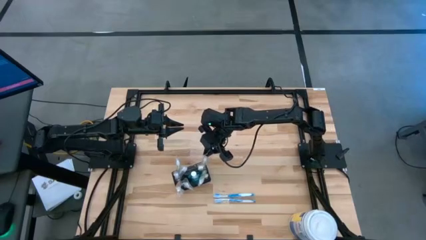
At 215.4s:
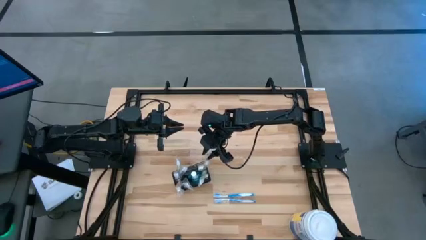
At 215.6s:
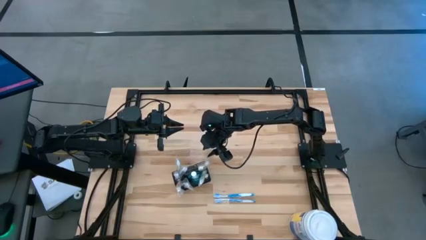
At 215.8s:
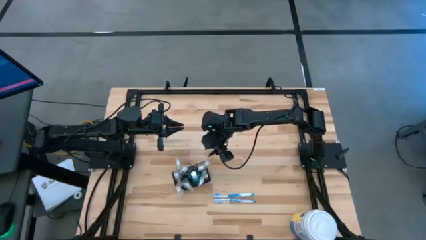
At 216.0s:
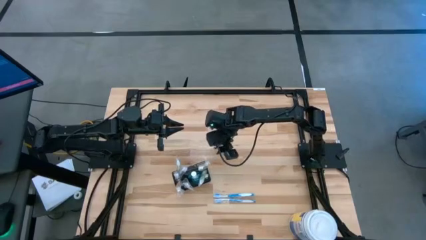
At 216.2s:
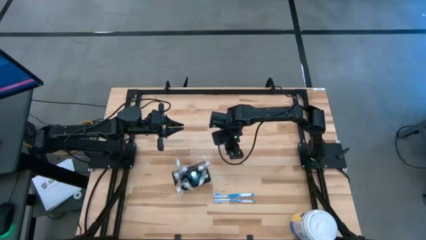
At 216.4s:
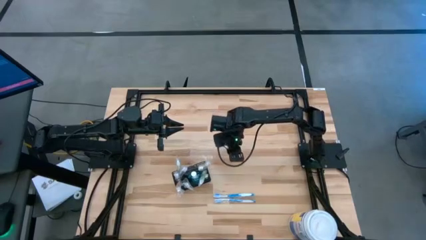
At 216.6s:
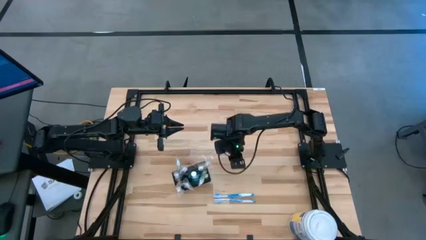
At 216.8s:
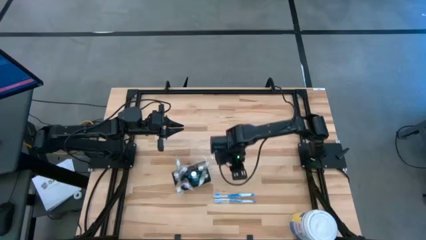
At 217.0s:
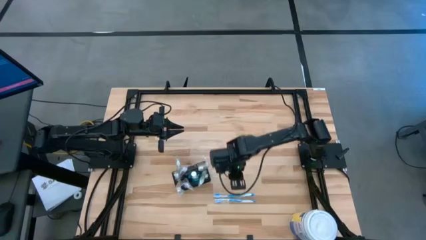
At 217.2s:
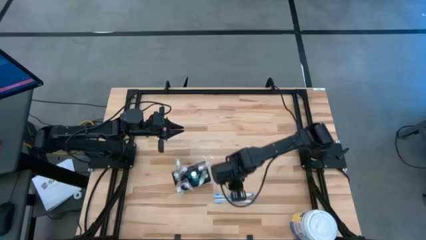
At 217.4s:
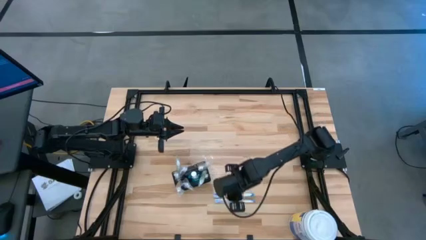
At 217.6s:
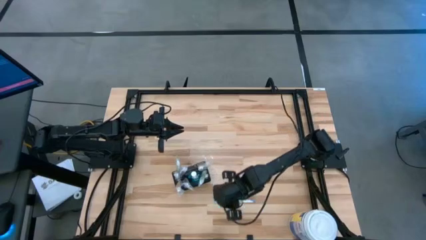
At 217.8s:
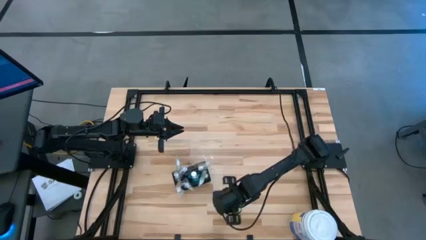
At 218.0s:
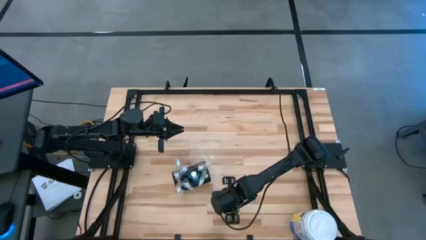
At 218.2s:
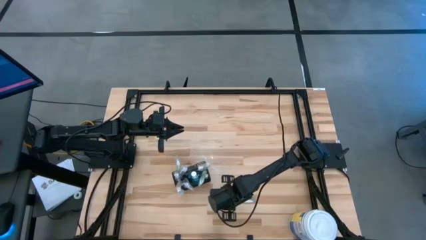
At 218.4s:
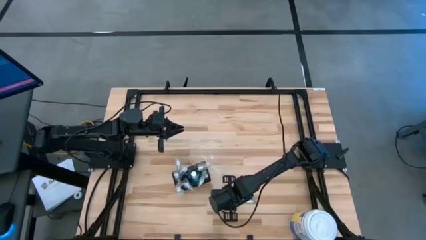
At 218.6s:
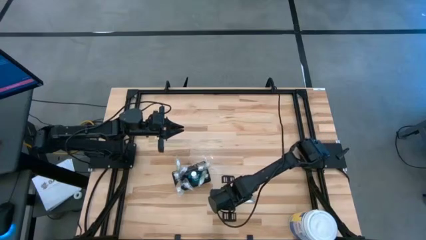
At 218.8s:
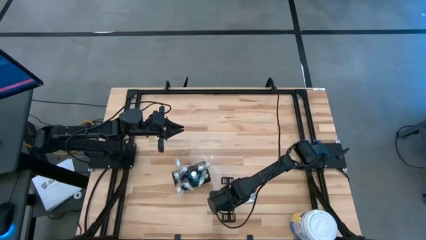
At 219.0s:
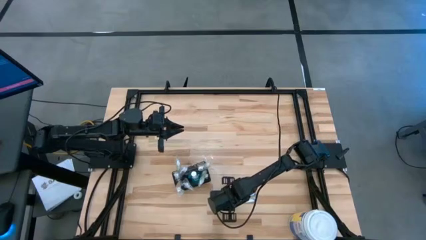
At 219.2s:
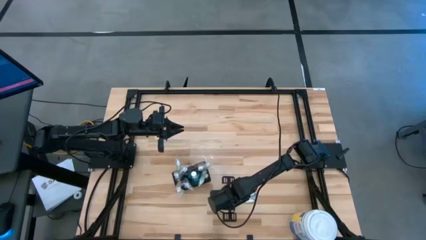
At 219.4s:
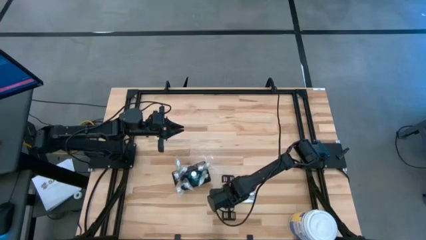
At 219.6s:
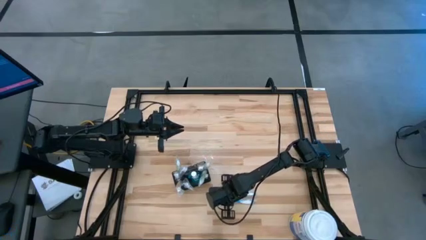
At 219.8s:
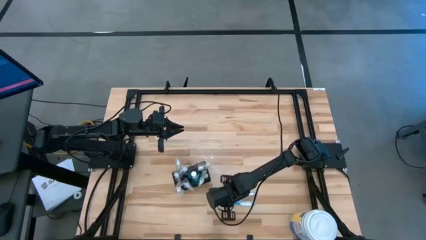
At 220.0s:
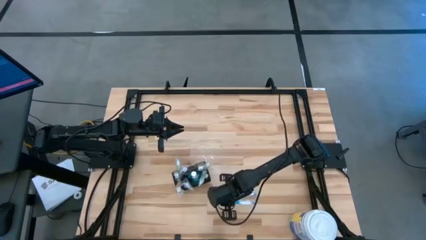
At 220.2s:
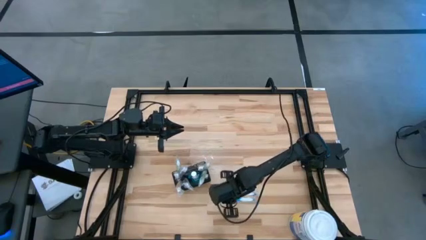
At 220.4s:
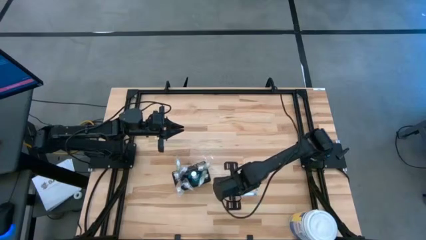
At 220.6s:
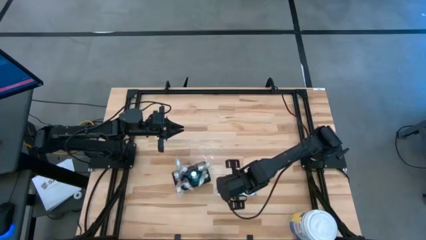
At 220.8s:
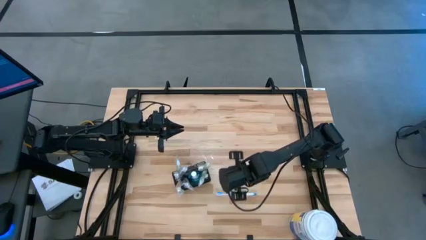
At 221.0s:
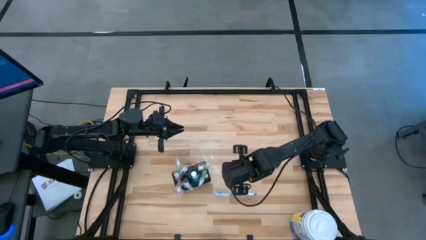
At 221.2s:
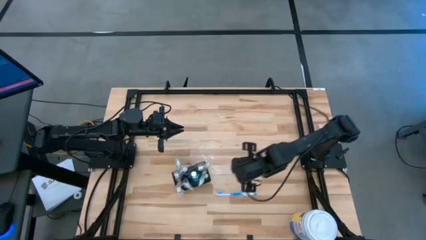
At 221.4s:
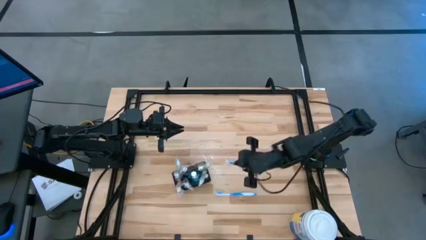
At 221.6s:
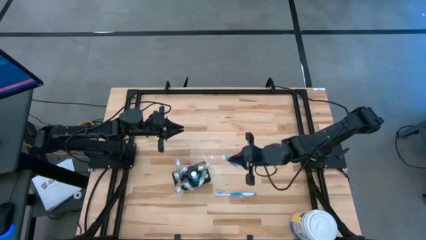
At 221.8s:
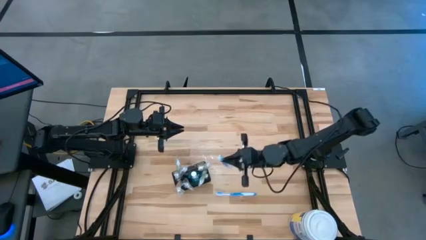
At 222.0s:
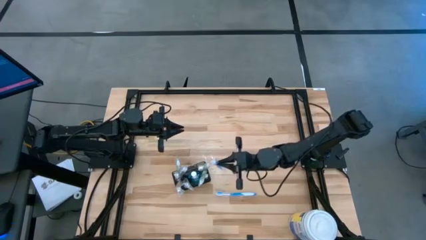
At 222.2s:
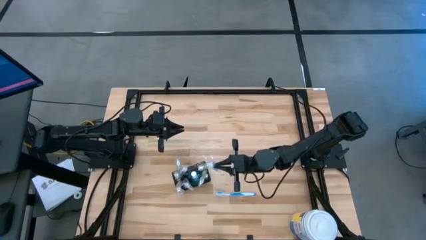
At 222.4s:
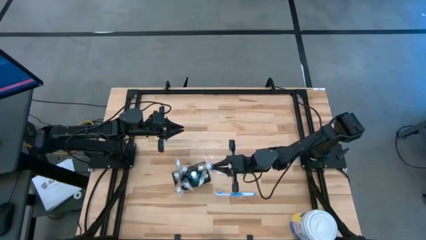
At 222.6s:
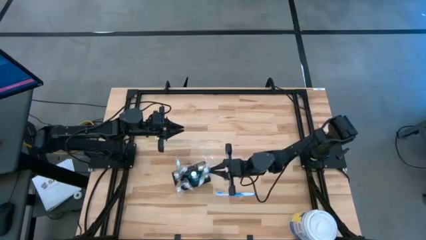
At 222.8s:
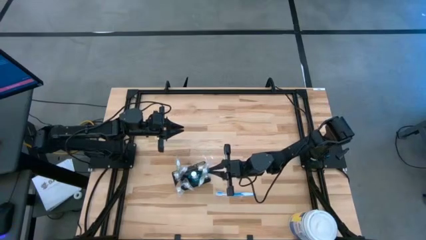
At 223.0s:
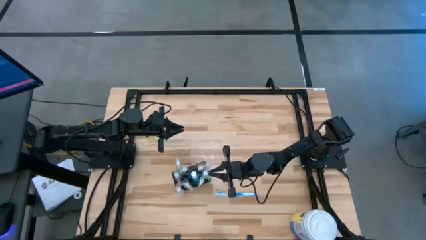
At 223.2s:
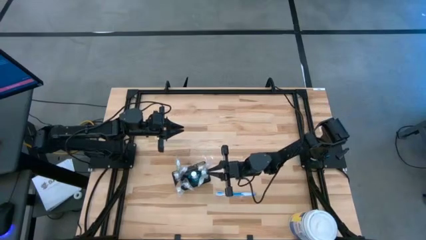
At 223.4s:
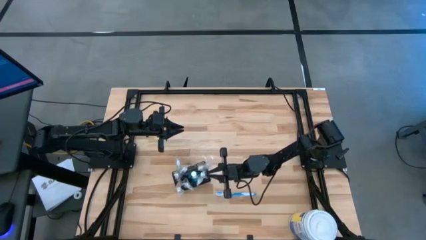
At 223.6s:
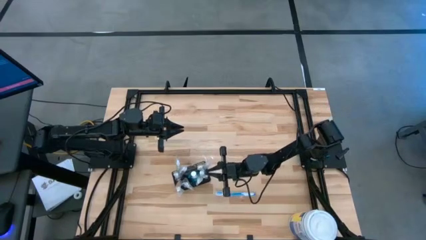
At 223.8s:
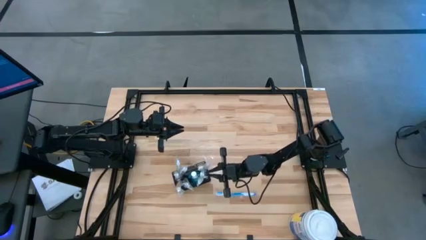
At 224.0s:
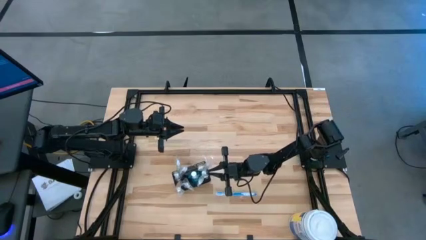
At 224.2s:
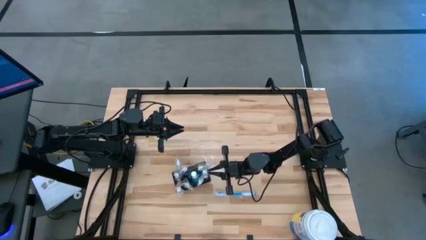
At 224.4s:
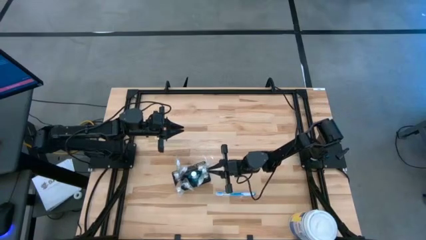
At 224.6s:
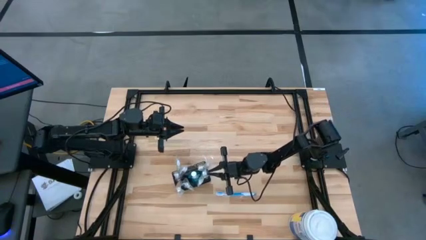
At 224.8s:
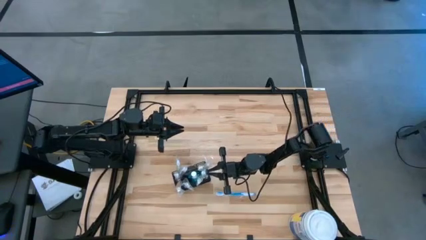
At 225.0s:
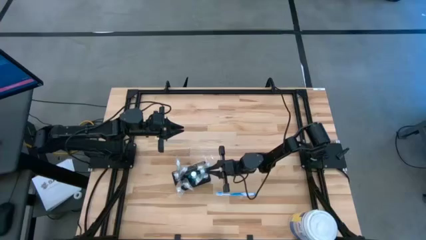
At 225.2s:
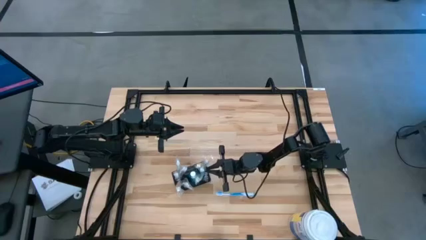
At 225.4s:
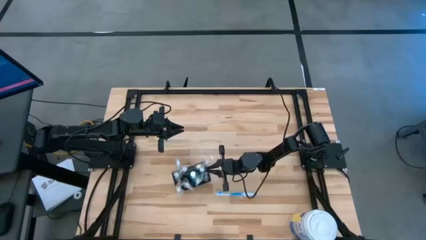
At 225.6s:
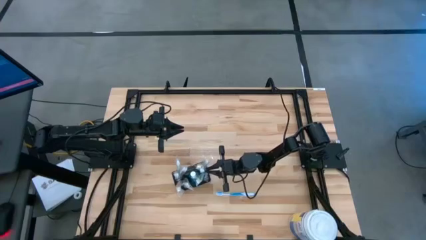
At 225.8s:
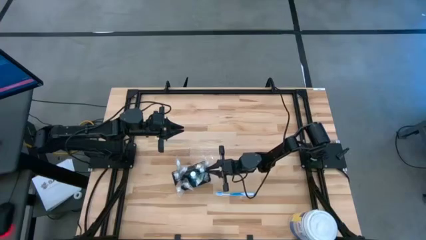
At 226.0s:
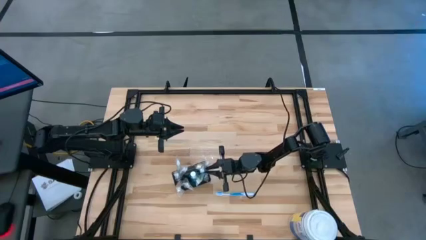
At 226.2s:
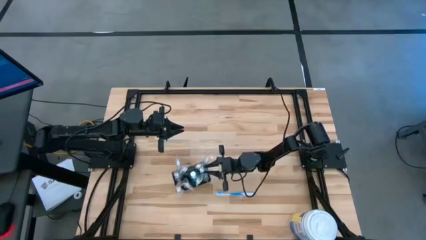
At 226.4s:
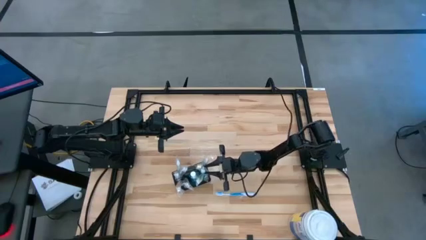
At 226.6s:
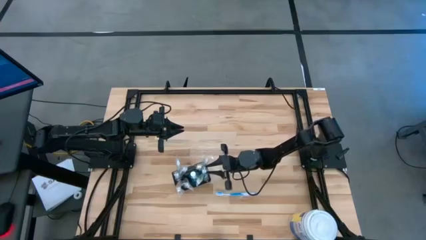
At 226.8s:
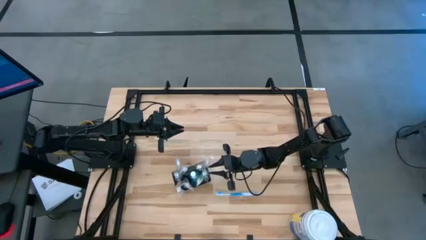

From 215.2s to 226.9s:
Task: Pick & Place toothbrushing station
Put the white blue toothbrush into the black toothbrush rack

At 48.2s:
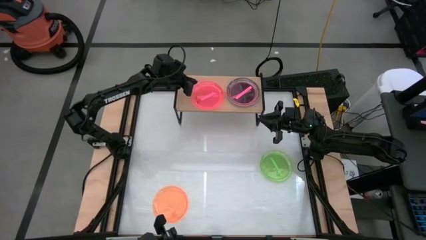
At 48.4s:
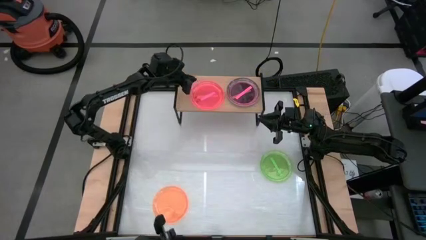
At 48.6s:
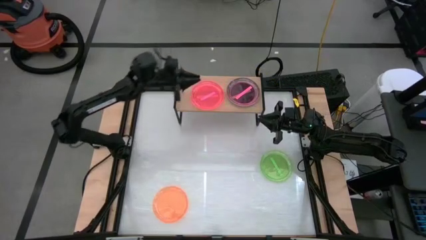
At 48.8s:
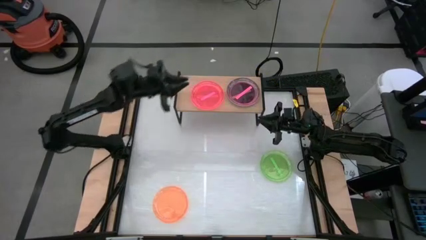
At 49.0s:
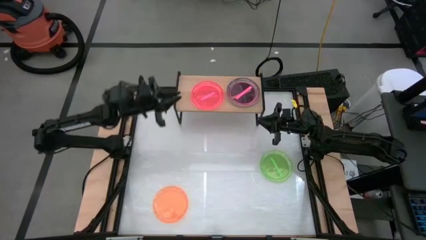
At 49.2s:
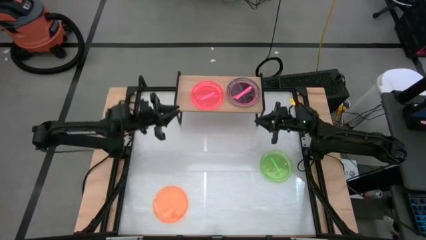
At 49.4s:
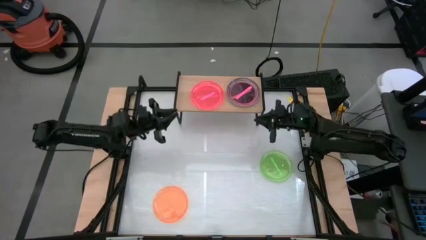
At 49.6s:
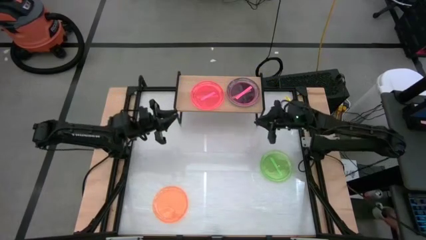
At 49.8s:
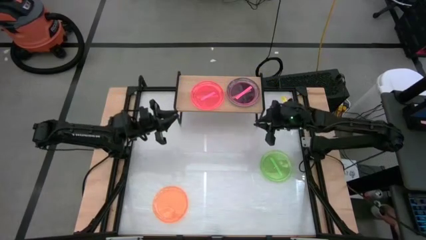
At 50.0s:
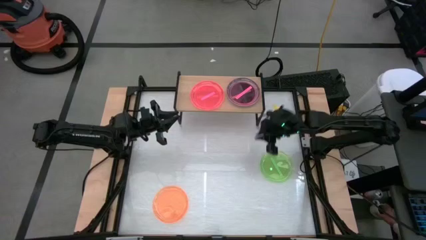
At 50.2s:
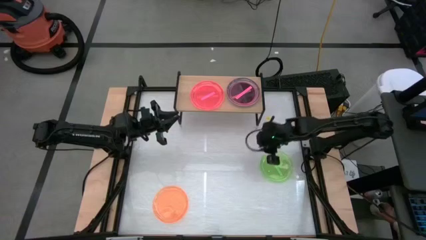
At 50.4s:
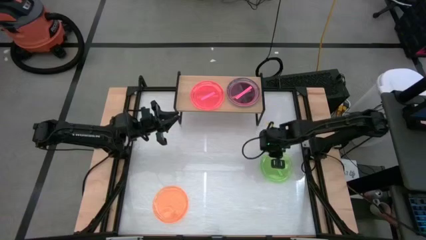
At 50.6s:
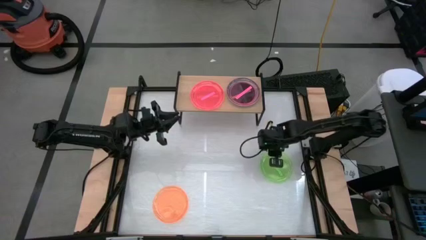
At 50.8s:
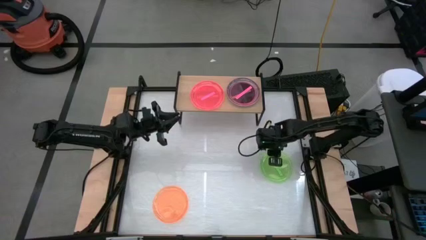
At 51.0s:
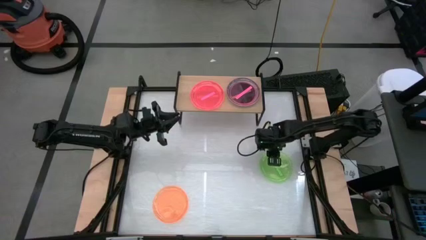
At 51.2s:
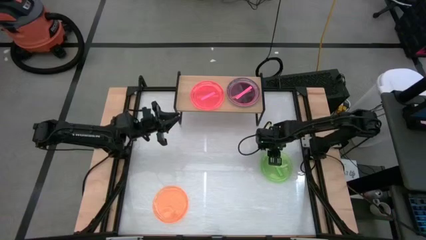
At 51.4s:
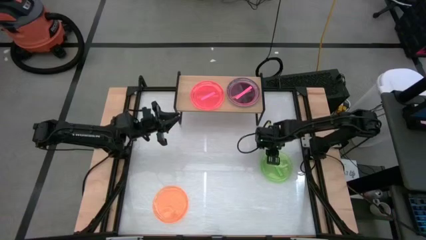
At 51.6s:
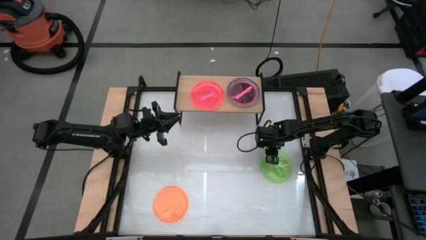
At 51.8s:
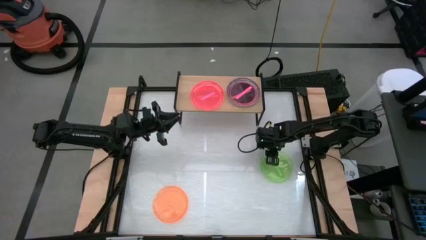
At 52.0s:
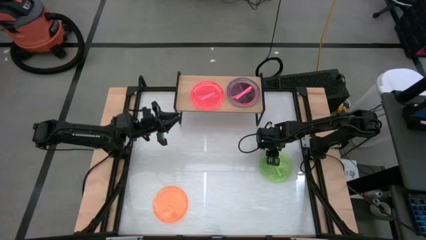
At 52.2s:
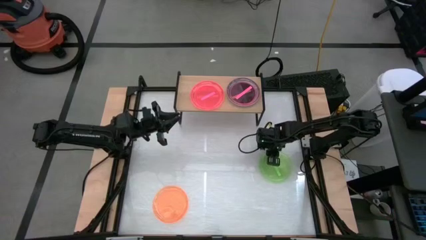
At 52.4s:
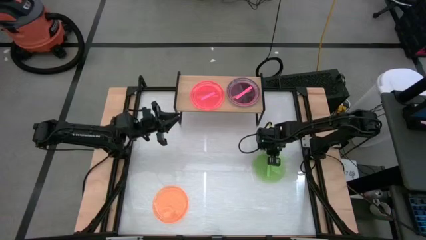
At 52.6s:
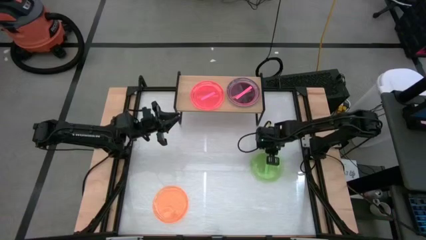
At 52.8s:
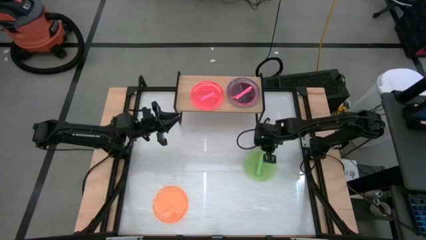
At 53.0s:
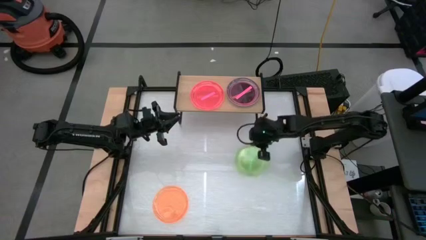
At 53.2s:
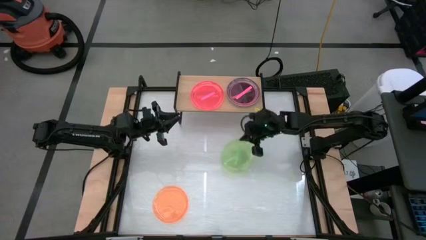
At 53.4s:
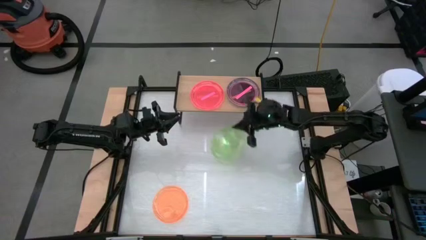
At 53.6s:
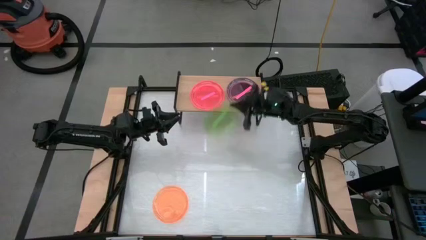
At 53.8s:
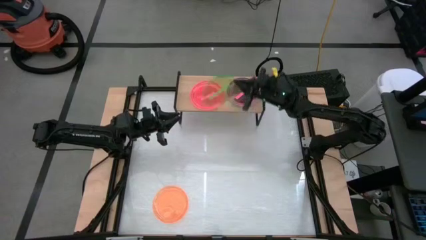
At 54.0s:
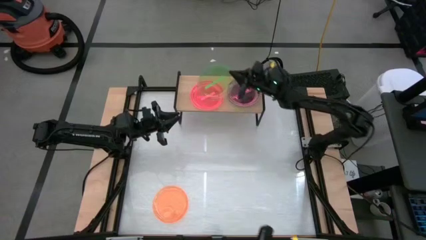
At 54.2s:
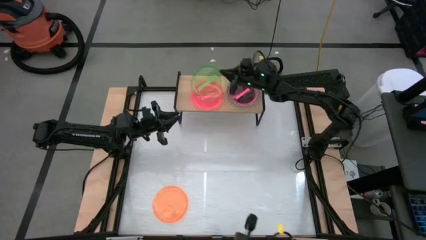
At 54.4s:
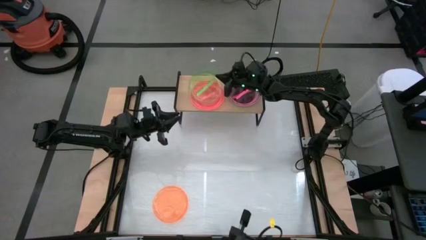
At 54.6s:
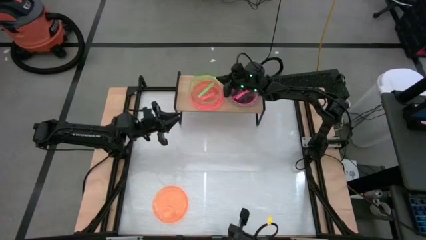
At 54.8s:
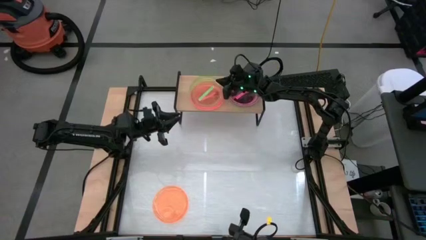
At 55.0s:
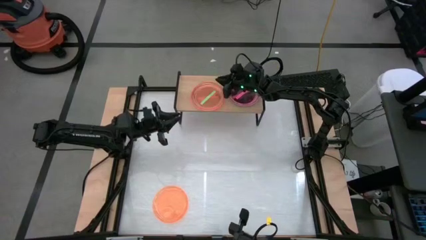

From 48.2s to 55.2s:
Task: Place and stack plates onto a shelf
Stack the green plate on the pink plate on the shelf
